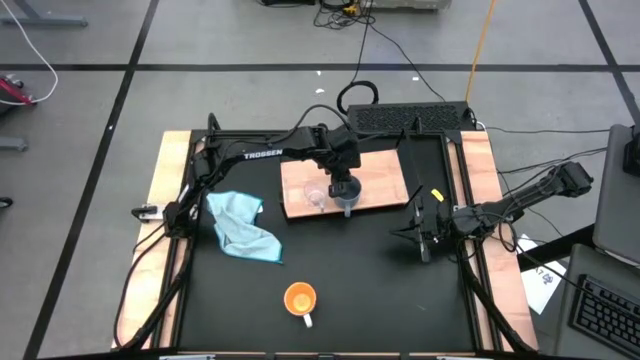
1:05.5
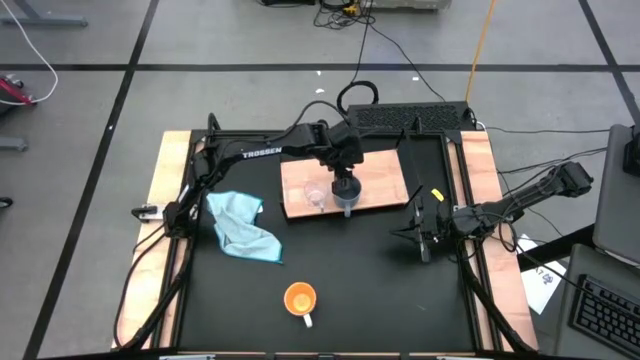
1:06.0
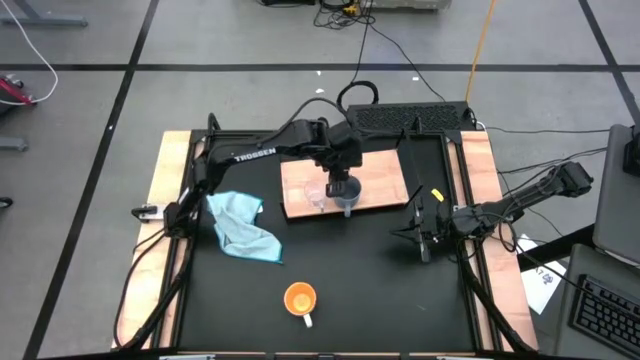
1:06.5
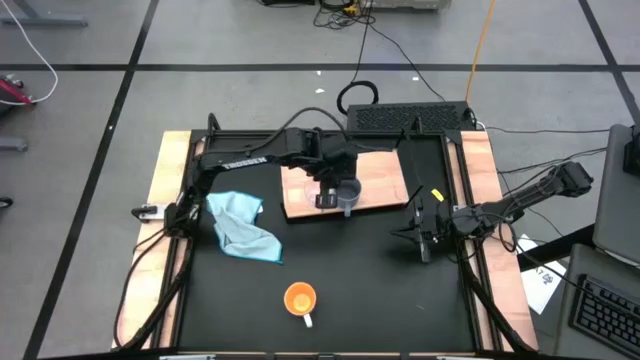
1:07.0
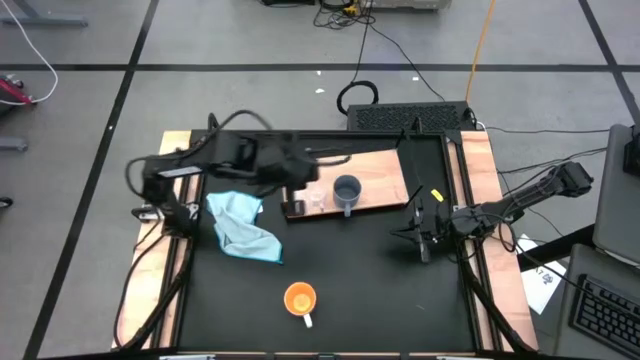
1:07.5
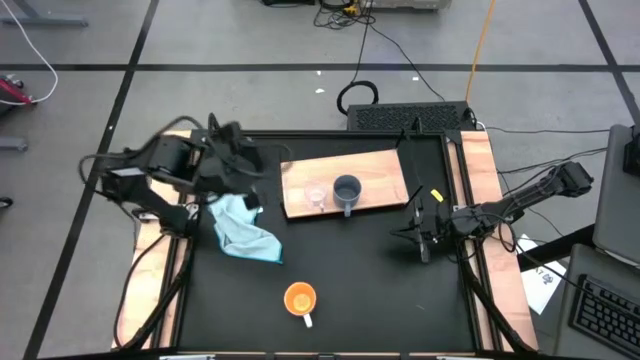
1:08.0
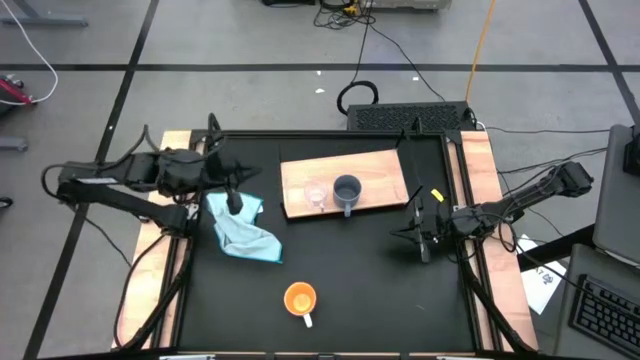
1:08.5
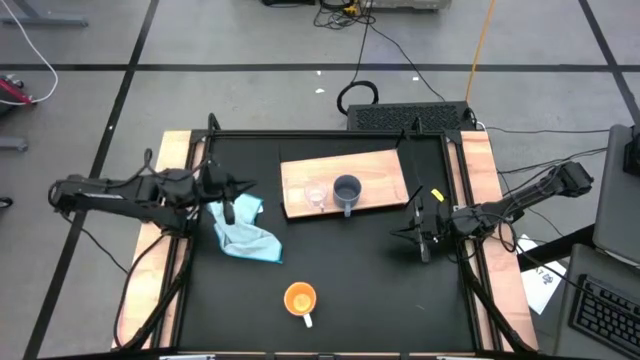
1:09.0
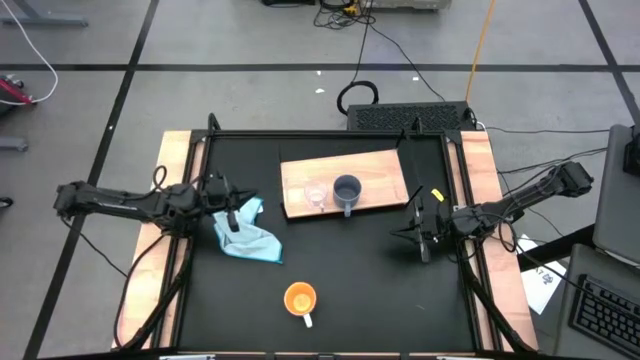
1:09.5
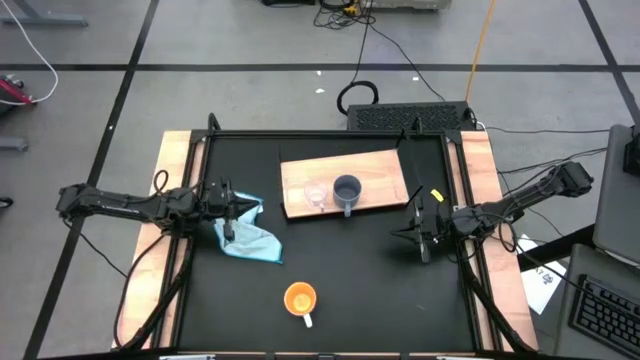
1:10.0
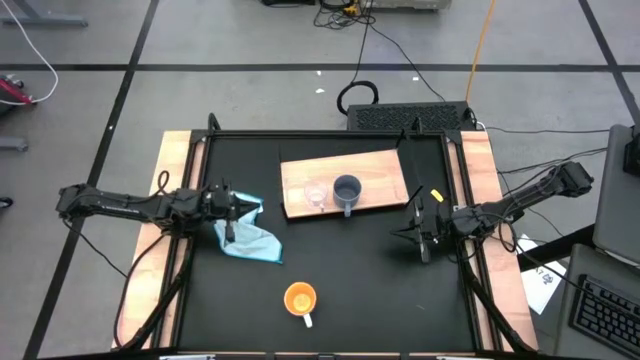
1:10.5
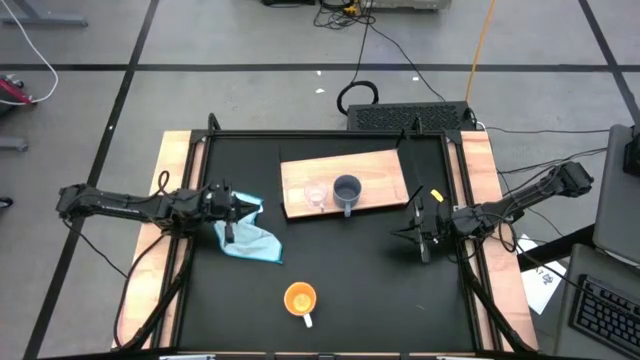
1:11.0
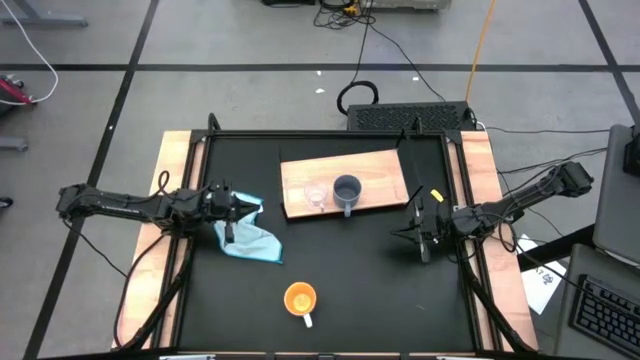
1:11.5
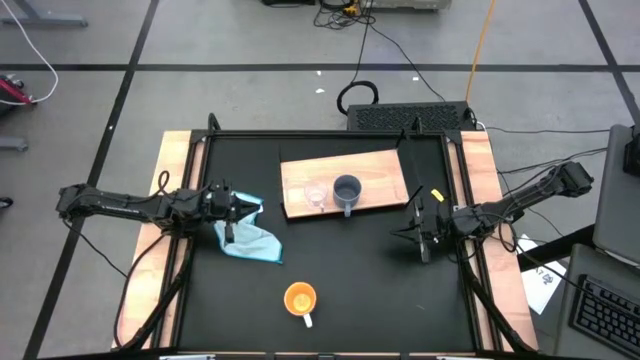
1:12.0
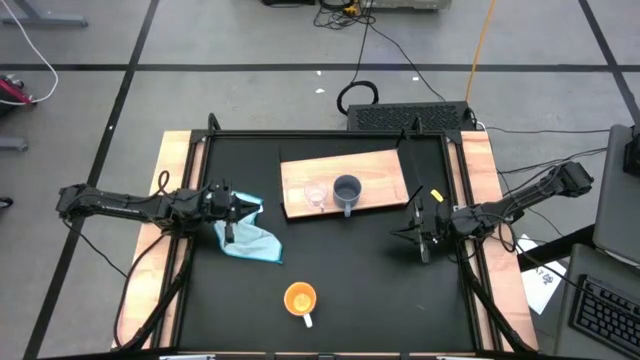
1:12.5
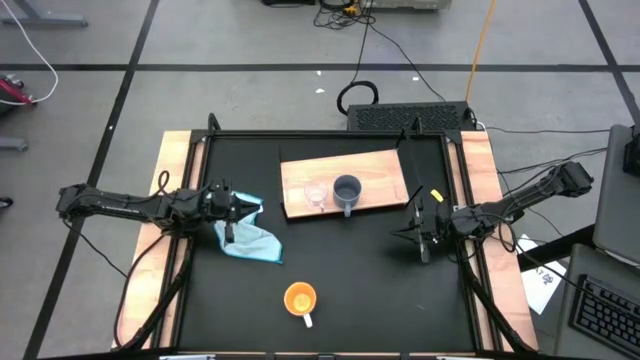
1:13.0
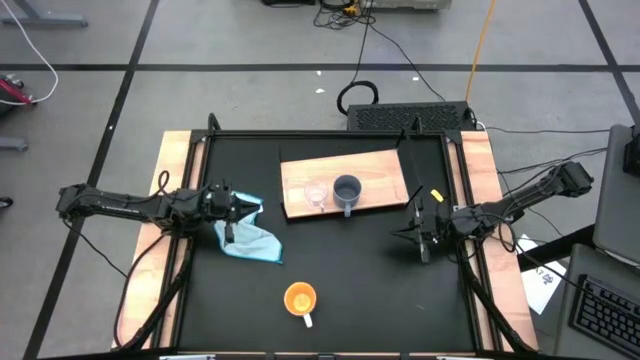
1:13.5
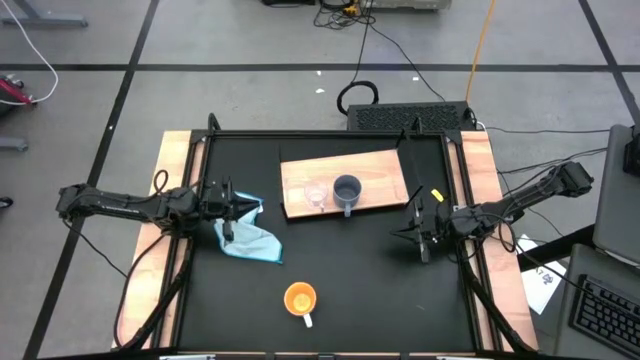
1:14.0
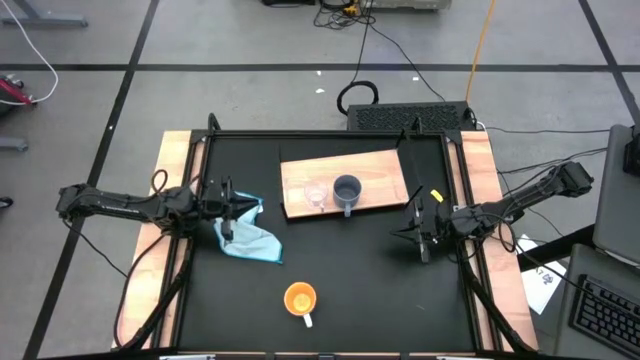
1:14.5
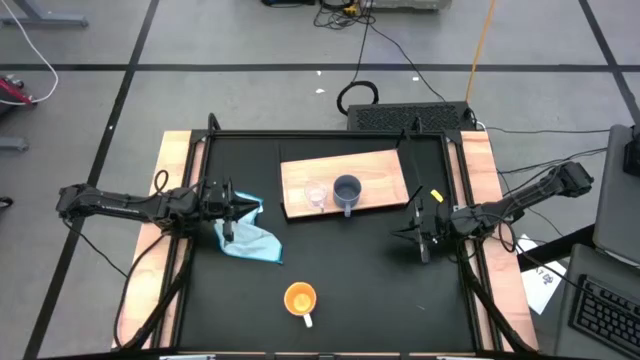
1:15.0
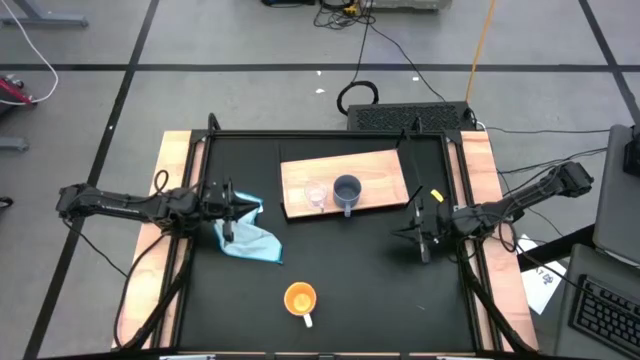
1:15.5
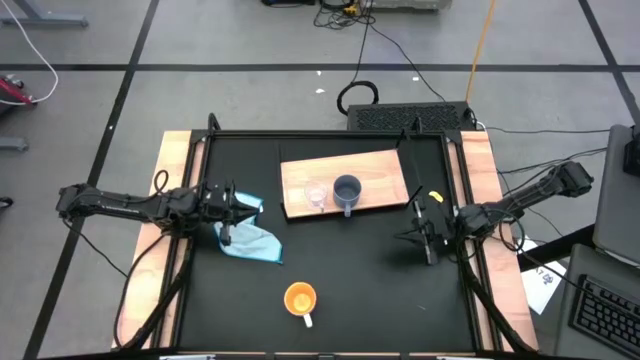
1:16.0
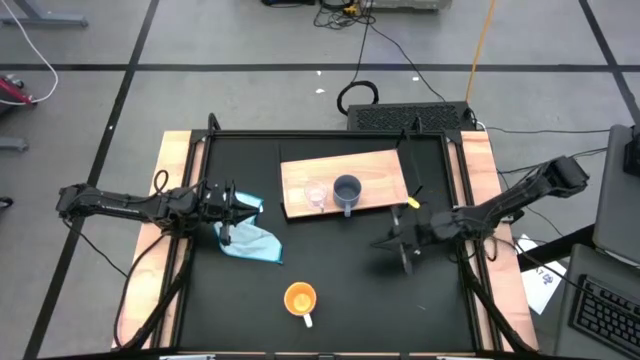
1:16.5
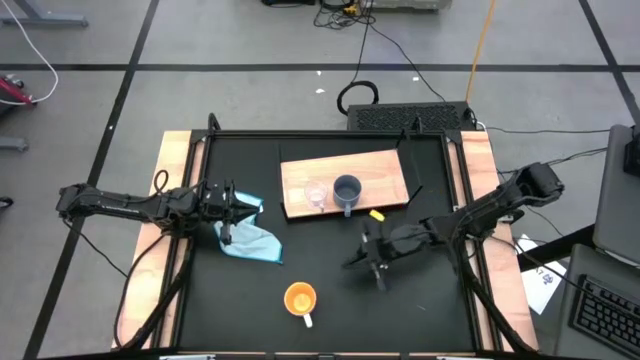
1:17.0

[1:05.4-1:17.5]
Task: Stack small to large cups/mugs on shelf
Put the yellow mug on the shelf

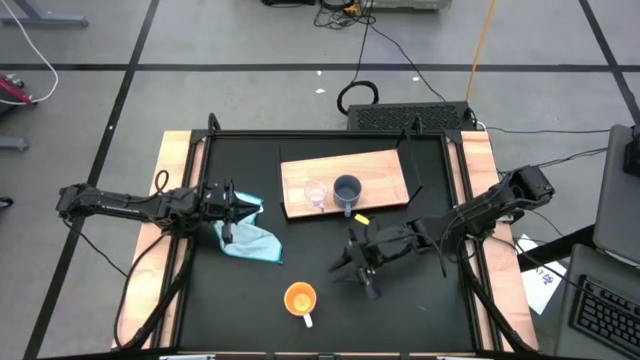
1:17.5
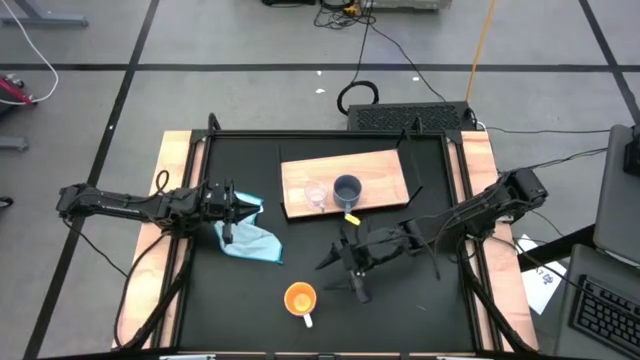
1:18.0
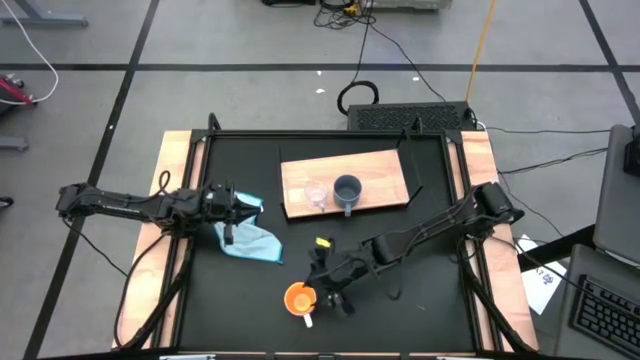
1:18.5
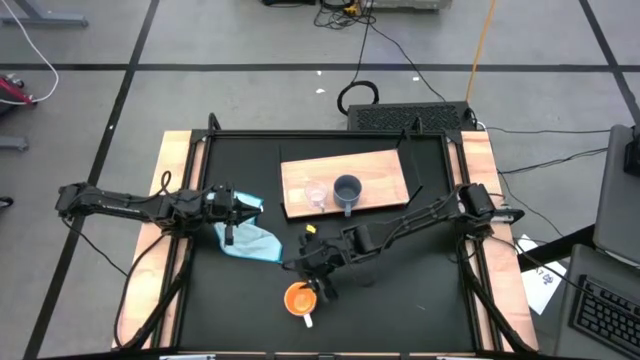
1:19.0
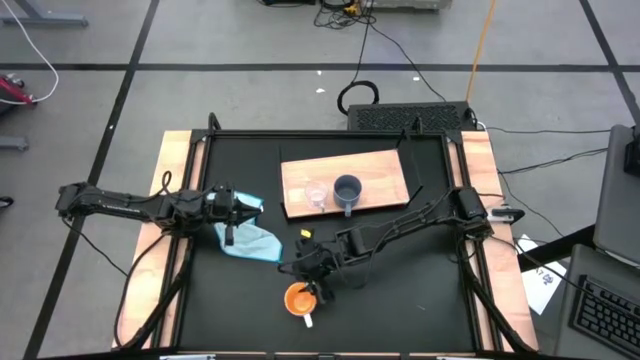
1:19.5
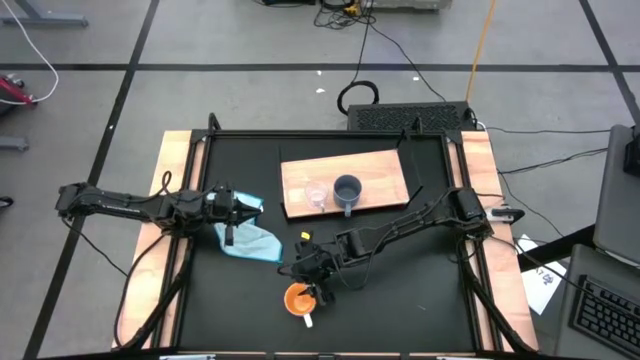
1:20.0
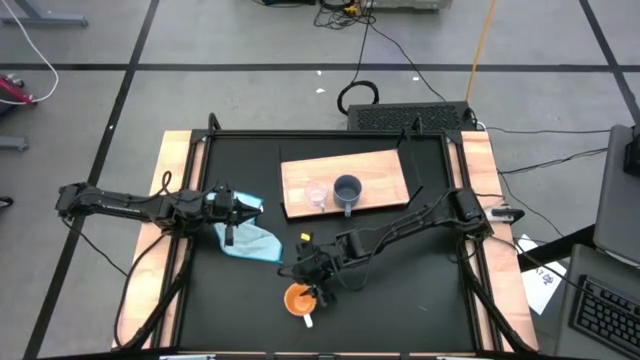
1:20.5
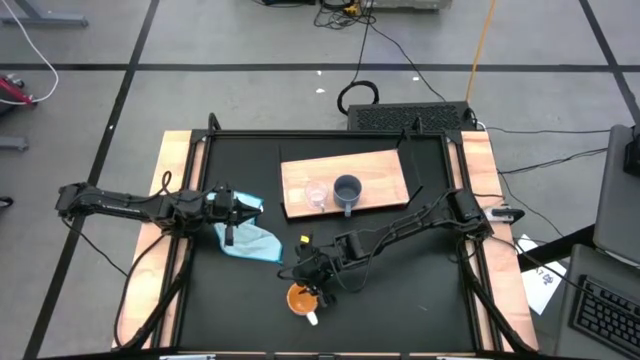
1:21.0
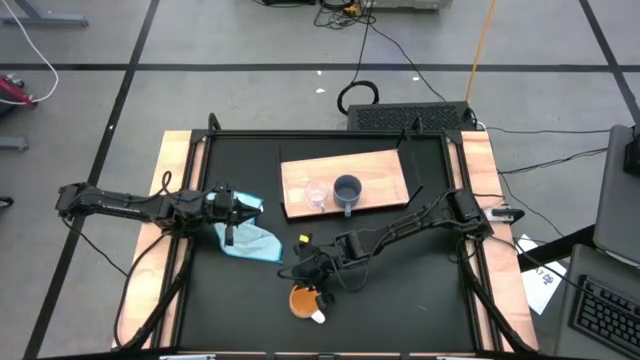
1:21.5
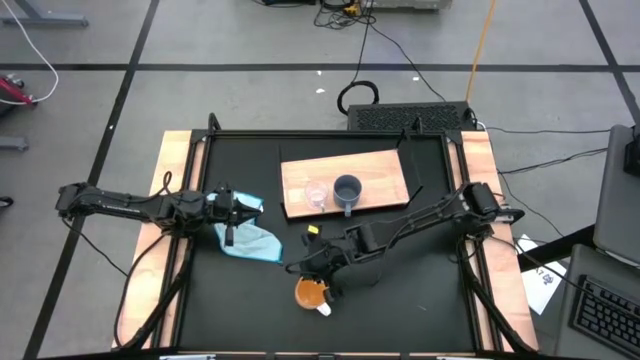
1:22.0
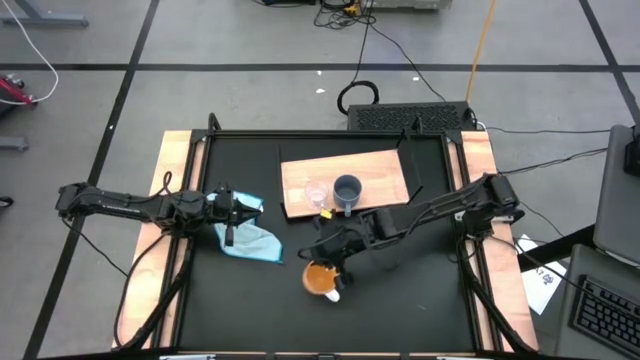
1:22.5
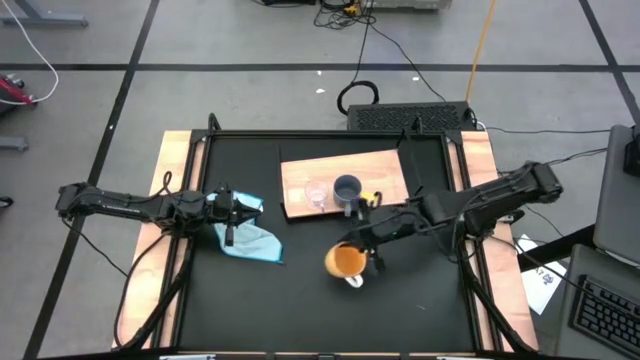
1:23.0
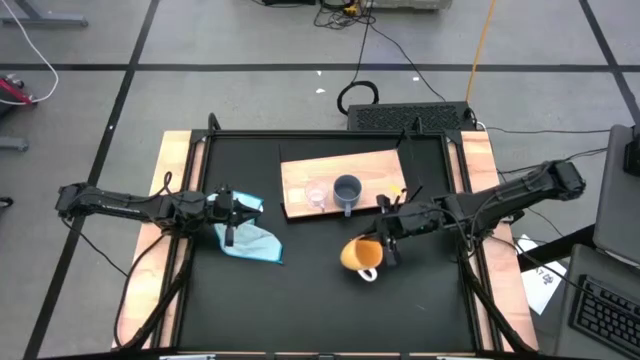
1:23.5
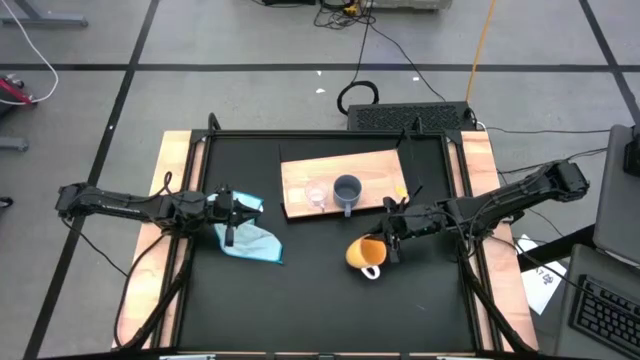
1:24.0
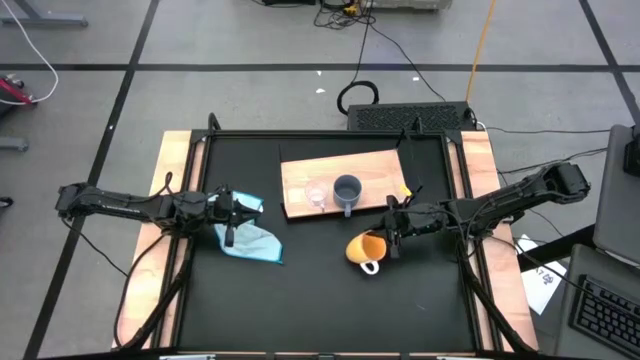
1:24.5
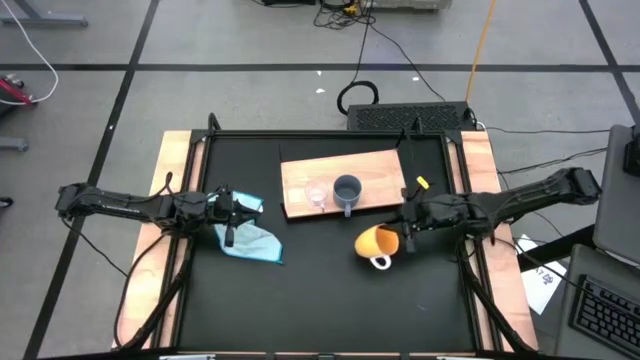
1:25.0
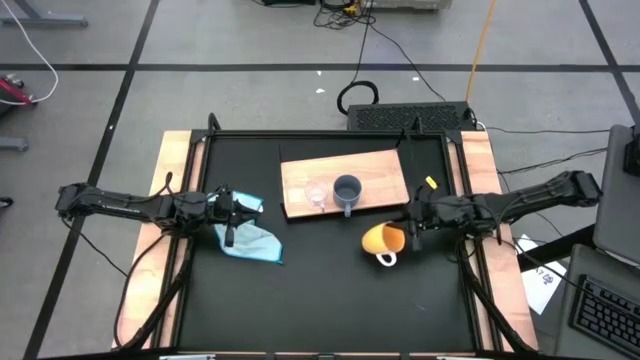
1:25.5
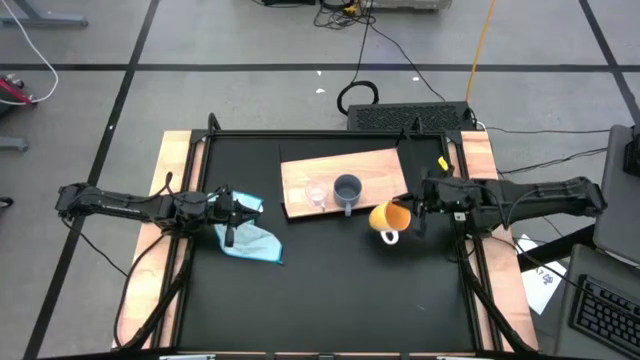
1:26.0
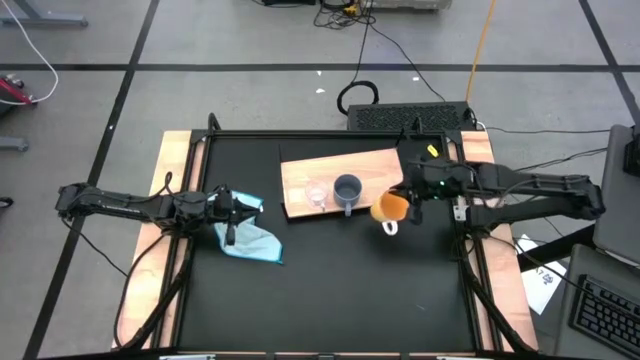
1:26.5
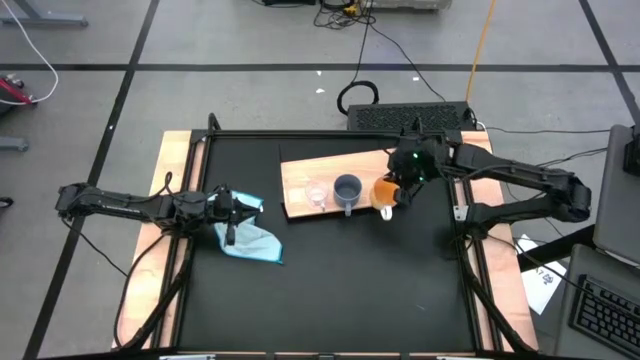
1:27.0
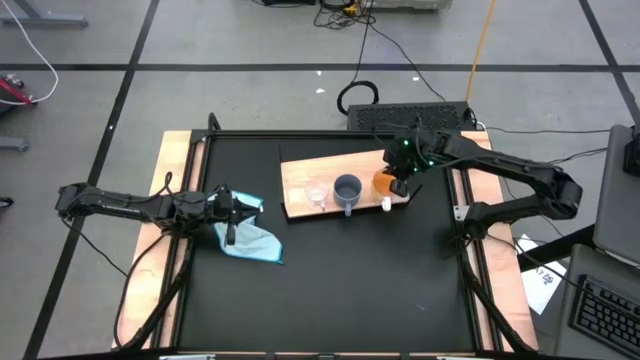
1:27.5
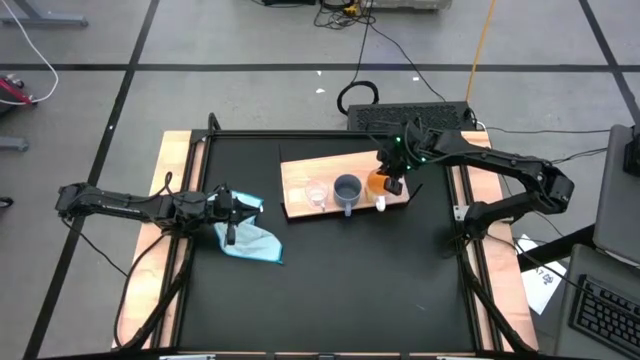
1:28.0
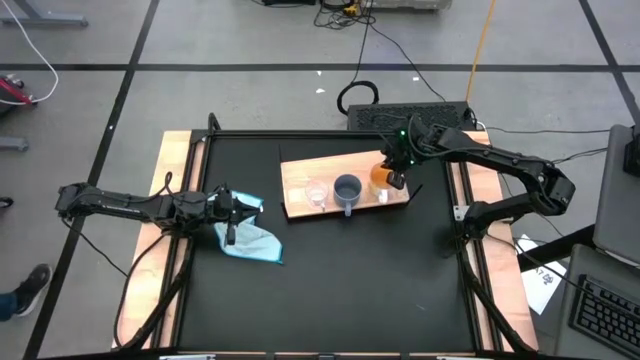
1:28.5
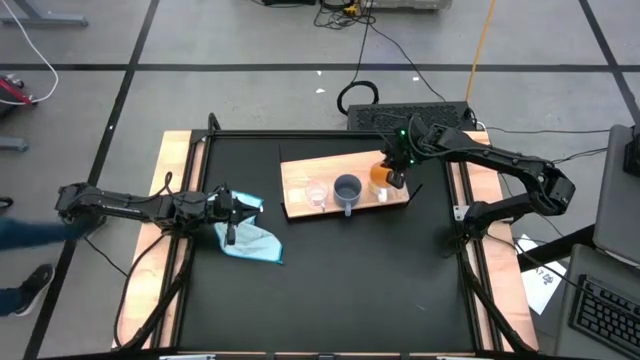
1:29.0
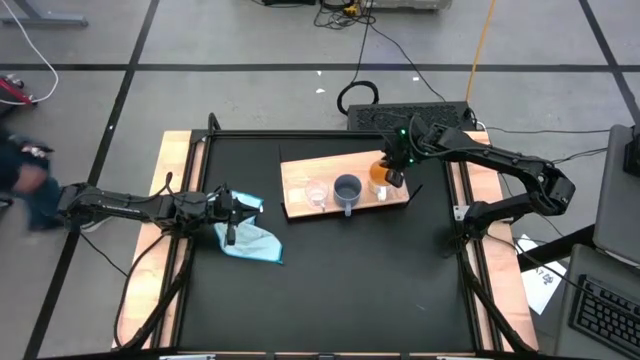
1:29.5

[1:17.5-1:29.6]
Put the yellow mug on the shelf
